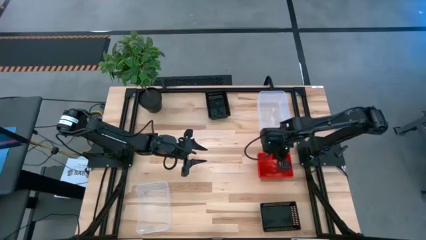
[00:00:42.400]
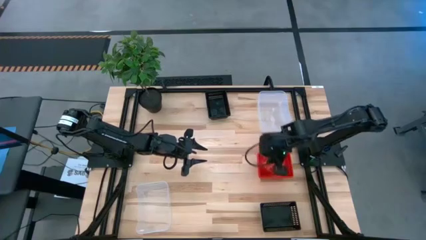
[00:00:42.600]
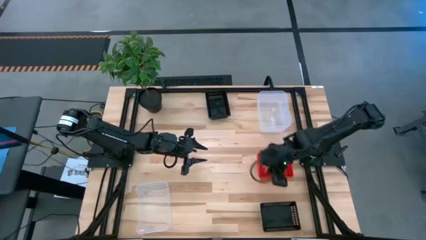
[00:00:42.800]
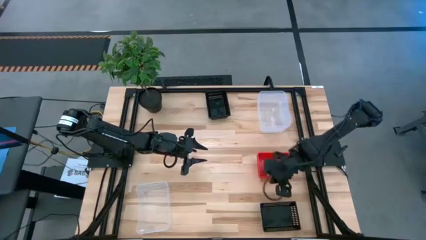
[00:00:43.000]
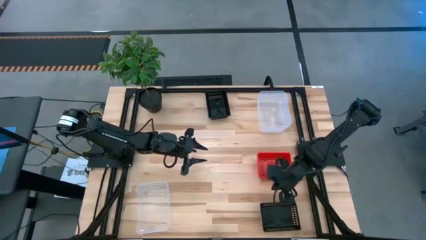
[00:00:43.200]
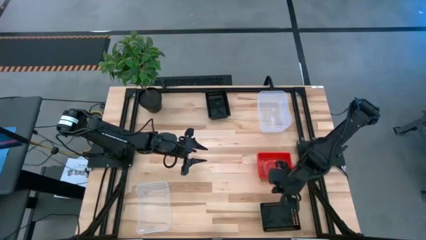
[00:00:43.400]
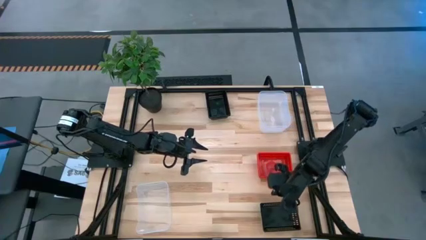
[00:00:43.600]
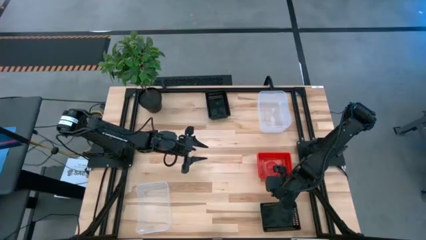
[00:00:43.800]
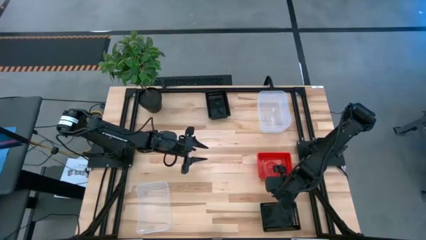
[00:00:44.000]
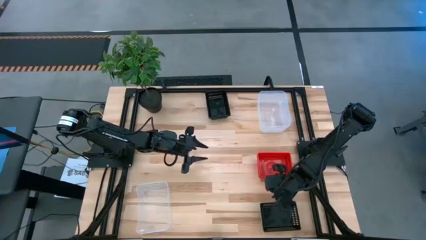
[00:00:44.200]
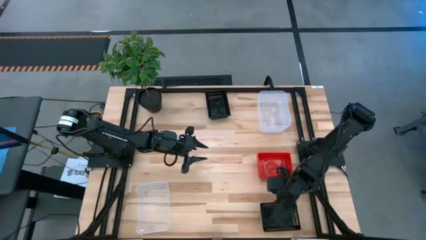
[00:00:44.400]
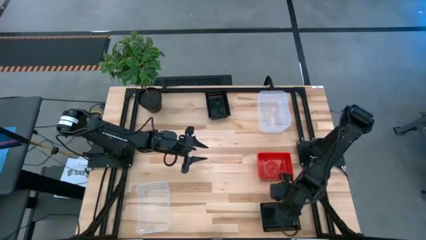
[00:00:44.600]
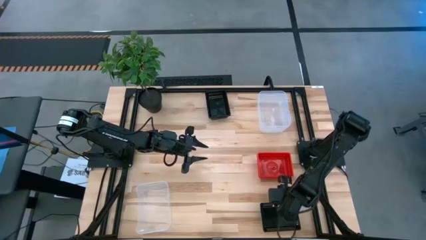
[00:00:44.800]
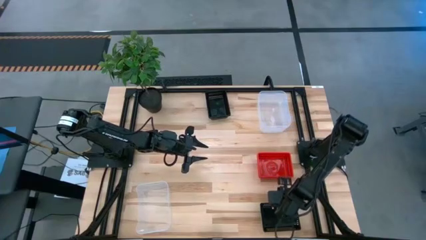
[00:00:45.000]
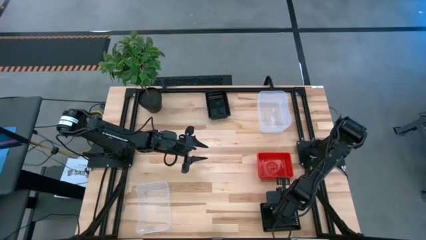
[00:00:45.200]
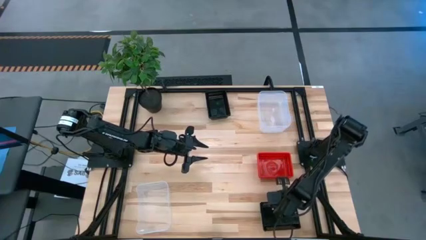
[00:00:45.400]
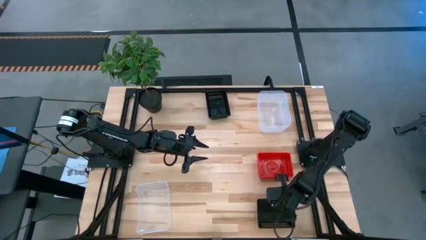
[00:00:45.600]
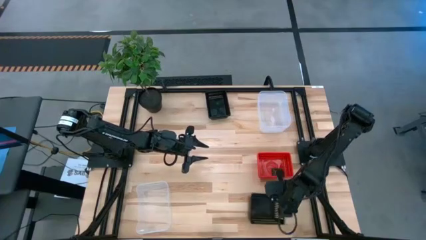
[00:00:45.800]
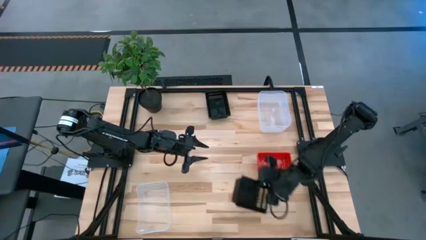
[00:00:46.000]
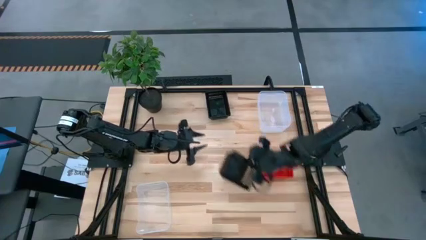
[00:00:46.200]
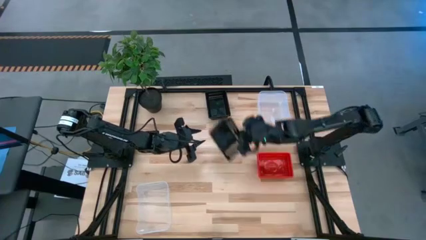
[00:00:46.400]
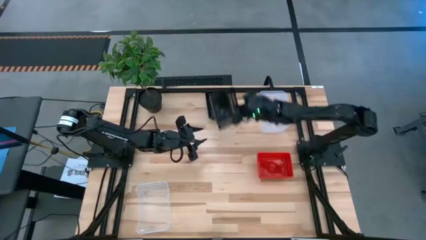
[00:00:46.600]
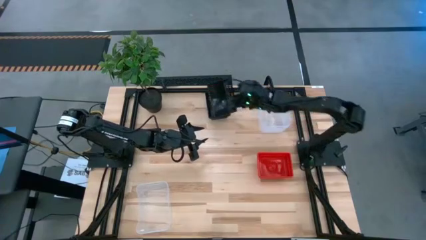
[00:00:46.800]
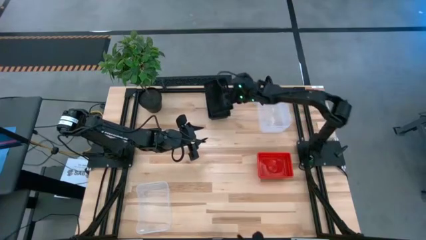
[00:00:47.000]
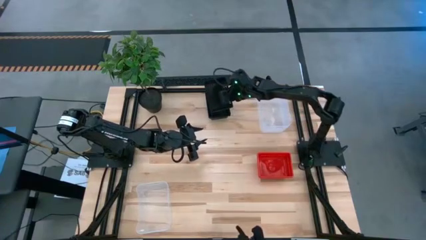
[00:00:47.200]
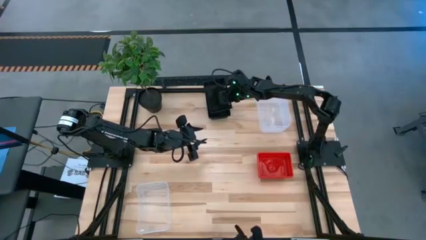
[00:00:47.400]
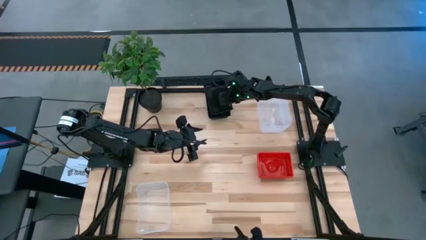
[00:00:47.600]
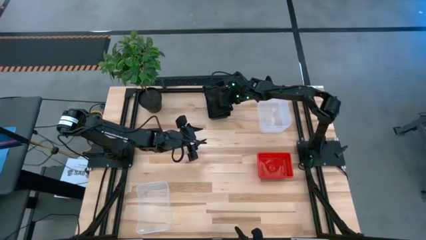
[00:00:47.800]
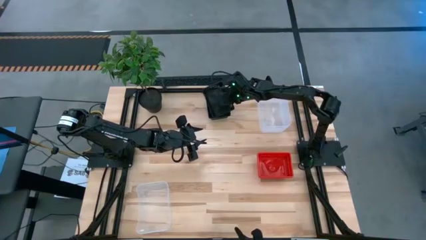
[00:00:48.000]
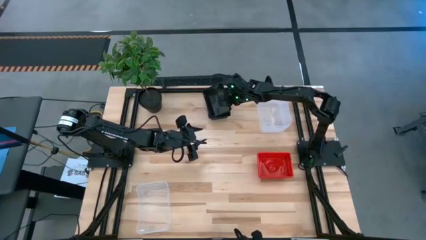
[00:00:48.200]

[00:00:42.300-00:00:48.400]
Stack the bottom black bin on top of the top black bin

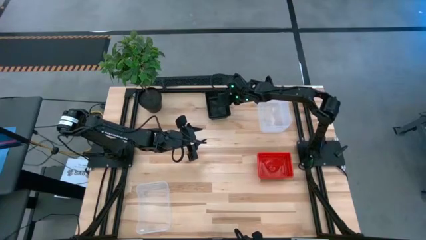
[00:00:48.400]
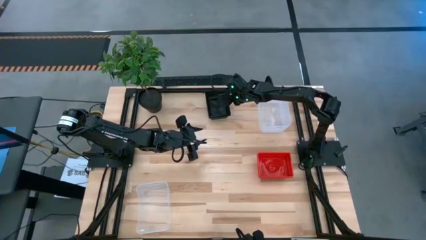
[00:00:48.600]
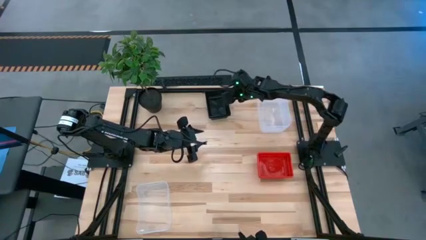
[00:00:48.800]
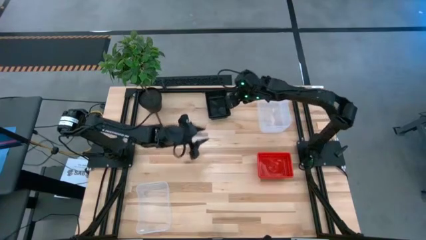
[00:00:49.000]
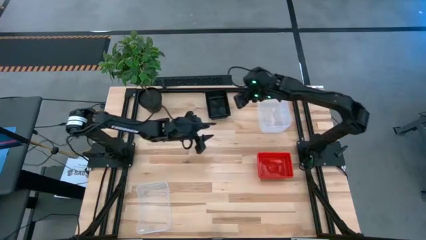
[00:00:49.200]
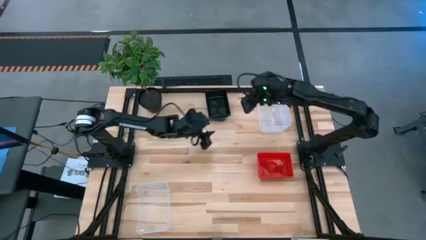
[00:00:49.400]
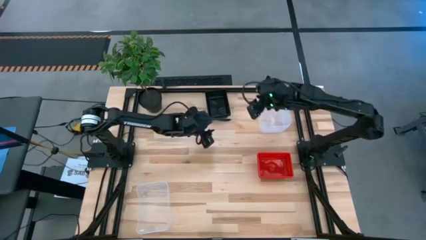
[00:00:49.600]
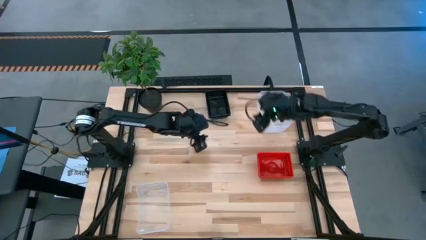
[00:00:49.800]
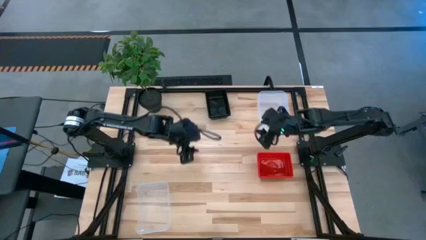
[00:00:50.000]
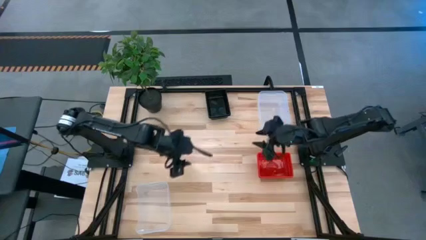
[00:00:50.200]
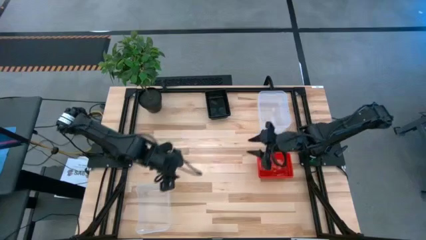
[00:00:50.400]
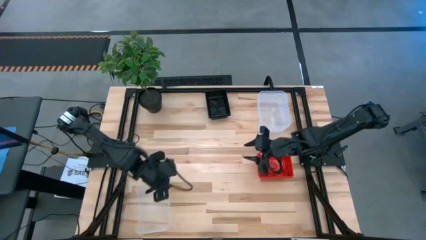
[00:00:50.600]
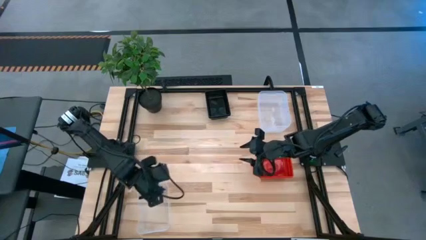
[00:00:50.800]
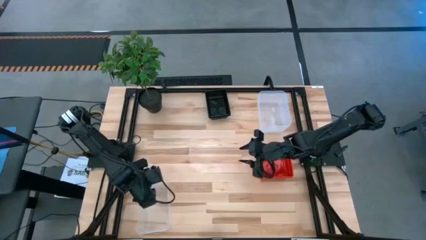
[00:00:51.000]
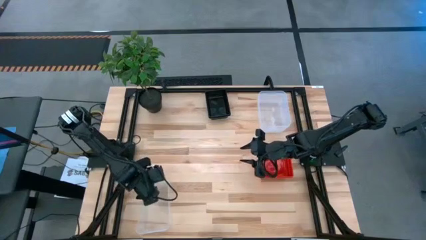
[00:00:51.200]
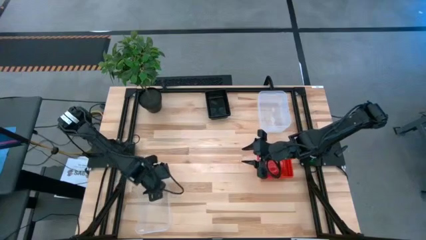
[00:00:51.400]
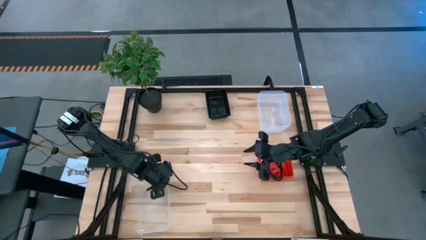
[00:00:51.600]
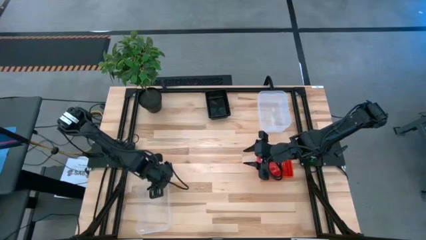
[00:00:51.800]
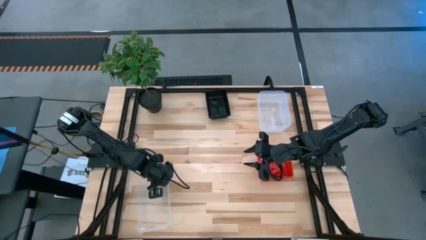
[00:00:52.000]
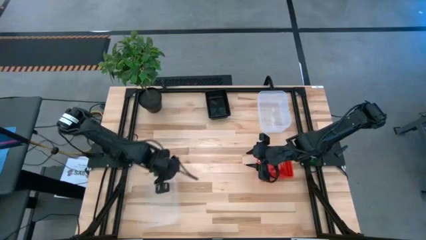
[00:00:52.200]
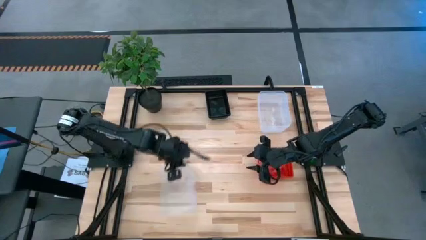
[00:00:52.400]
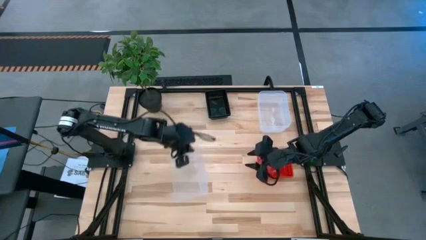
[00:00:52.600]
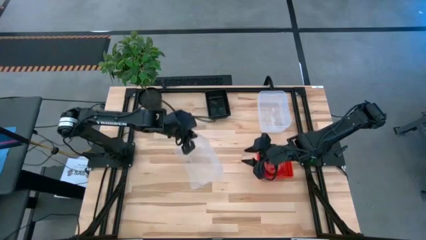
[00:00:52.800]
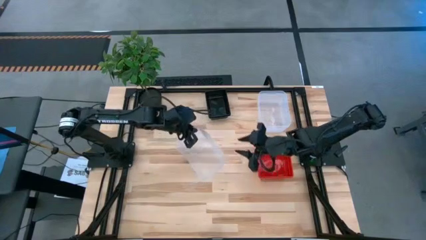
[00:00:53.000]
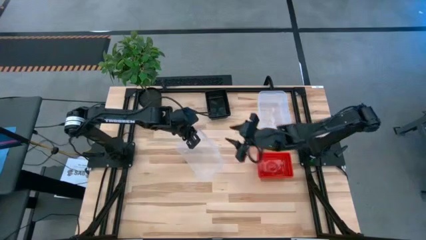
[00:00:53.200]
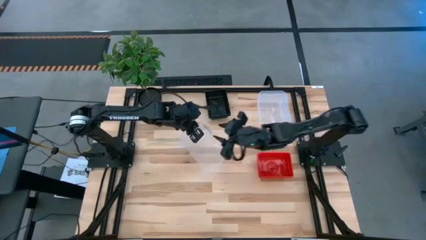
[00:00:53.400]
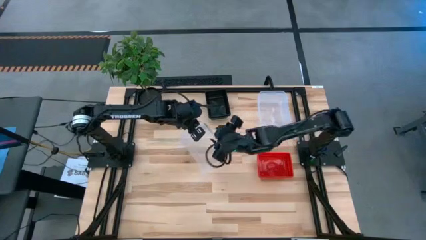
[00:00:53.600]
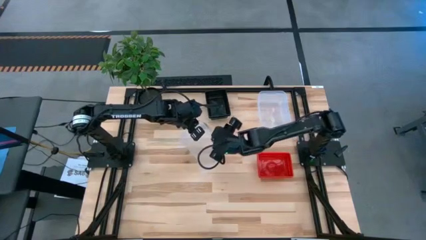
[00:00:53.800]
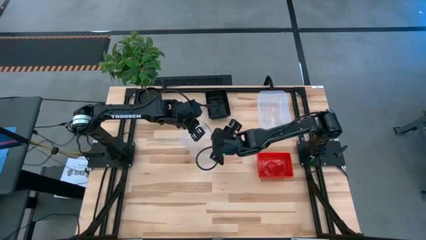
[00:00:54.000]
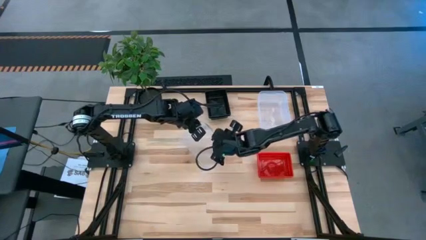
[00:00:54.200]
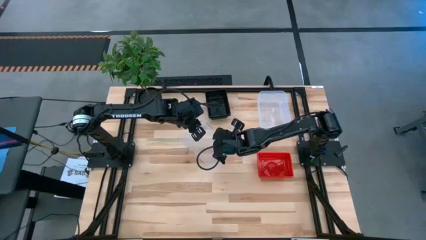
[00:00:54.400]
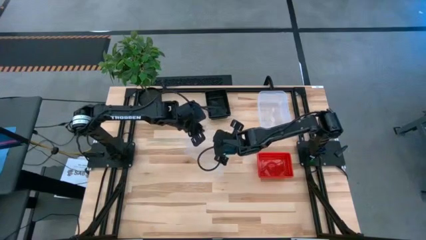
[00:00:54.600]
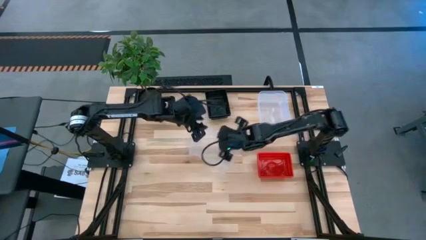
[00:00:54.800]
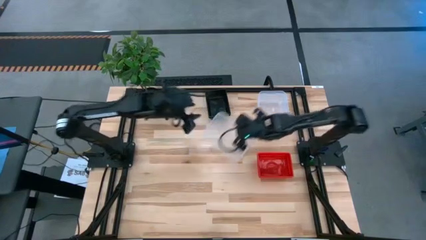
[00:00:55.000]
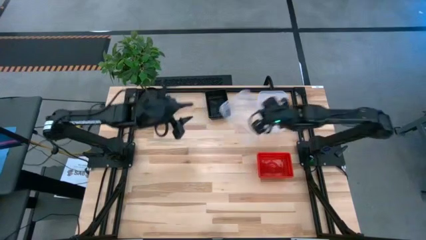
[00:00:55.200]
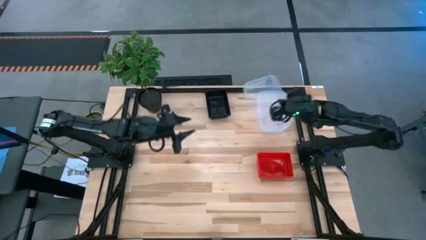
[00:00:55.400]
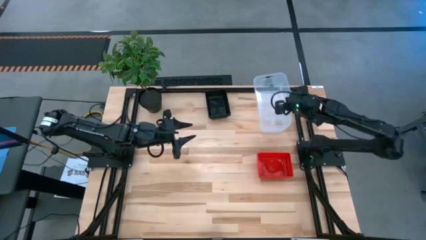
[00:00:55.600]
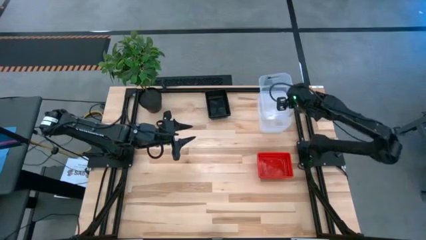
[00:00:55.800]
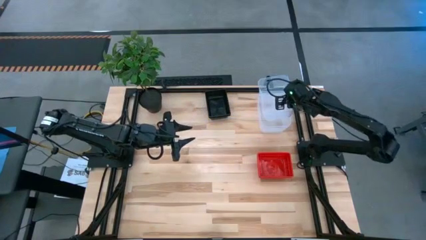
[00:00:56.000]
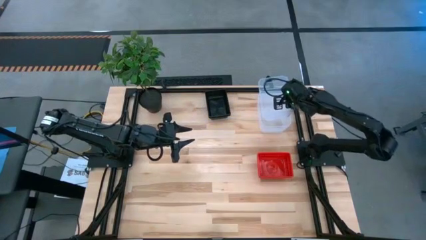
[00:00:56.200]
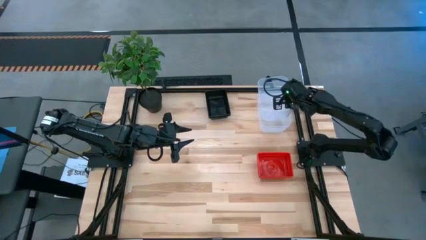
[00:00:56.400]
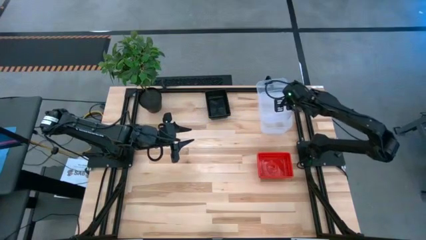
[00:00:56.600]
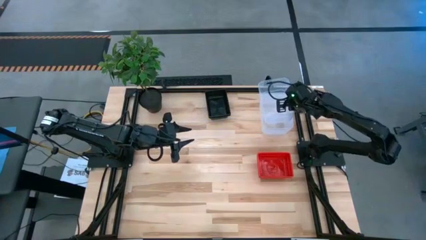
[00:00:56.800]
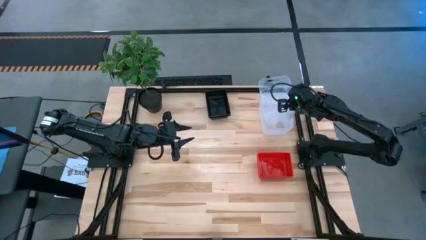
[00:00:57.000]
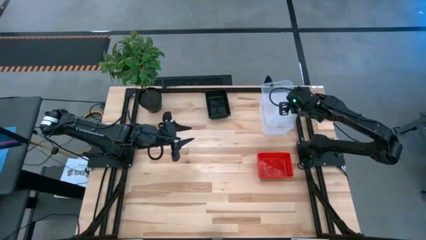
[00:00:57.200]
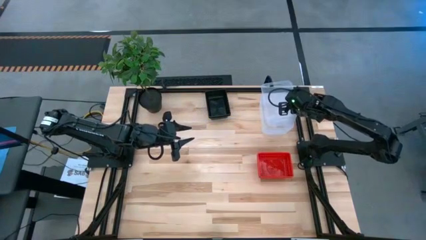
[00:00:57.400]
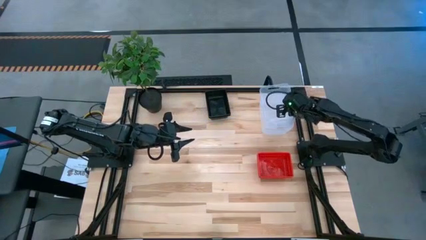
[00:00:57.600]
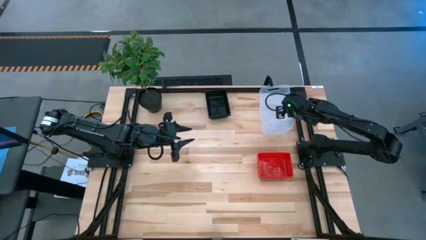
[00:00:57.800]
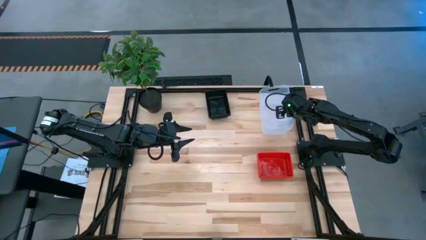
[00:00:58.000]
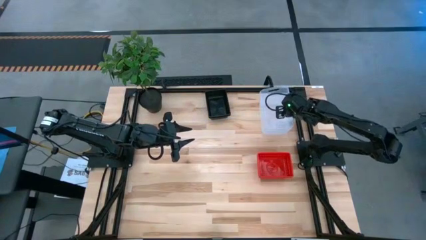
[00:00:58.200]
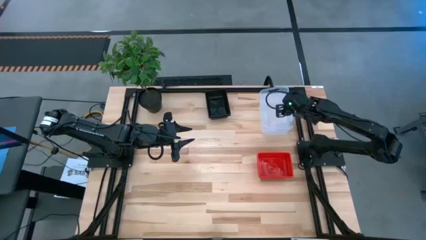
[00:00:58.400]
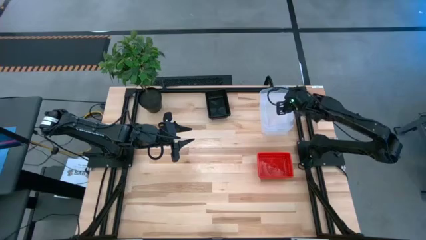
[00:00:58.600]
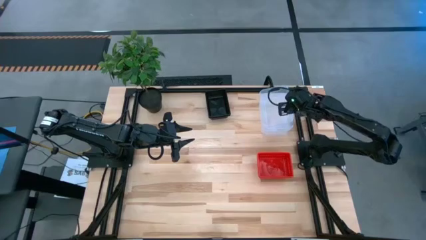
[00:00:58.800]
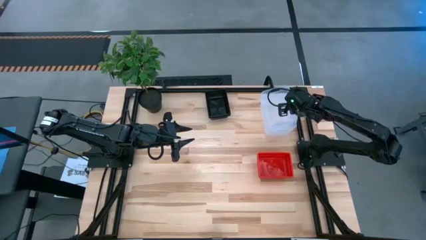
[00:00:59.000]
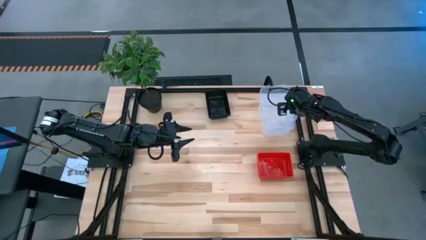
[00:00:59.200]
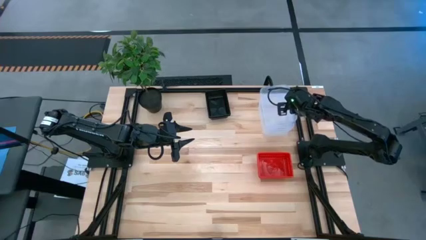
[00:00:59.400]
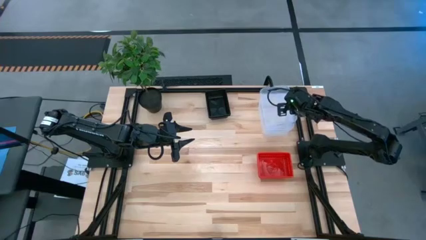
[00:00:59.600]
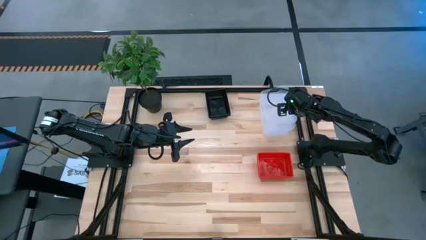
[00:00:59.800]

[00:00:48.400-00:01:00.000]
Stack the bottom transparent bin on top of the top transparent bin
